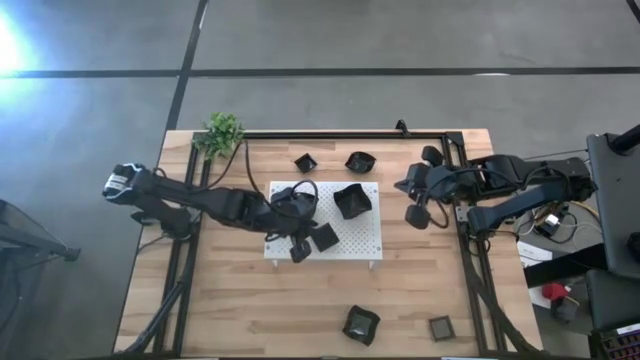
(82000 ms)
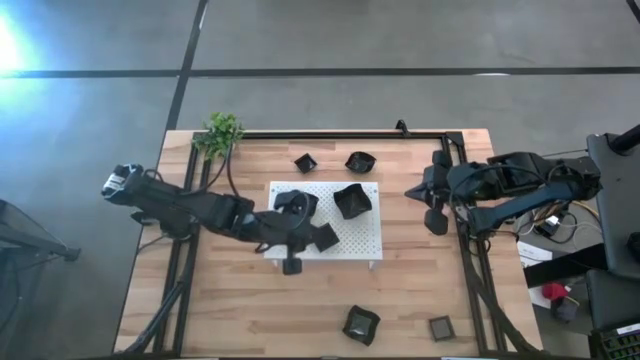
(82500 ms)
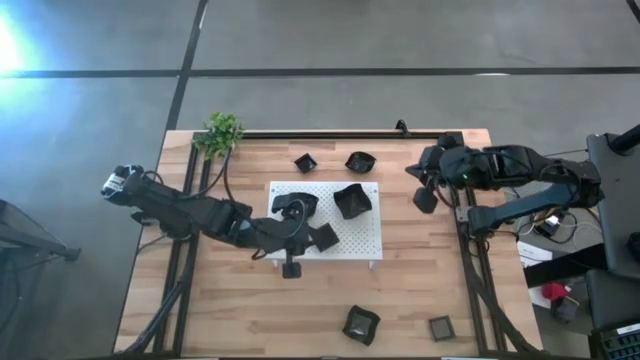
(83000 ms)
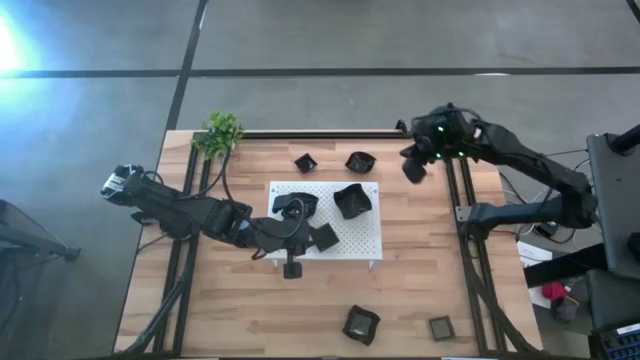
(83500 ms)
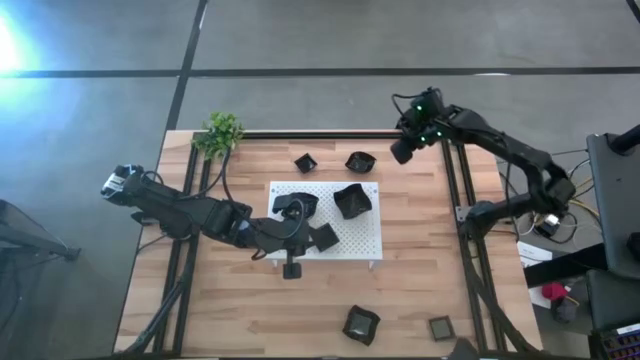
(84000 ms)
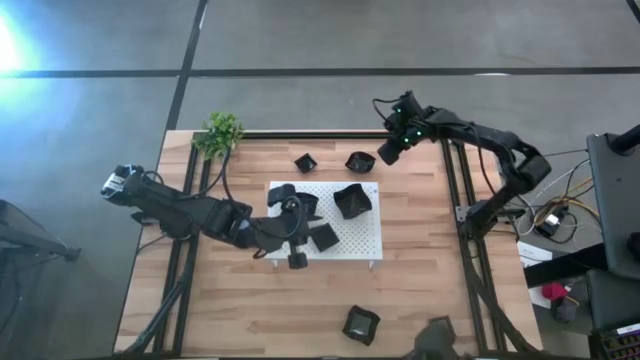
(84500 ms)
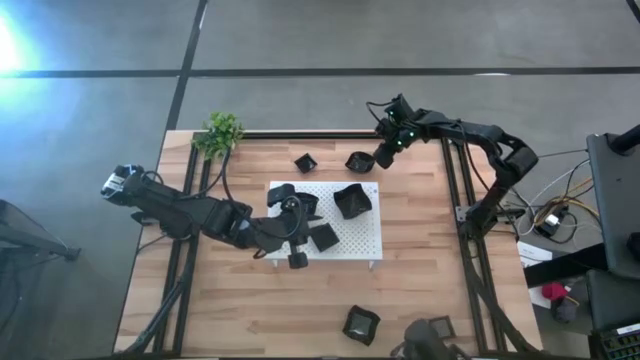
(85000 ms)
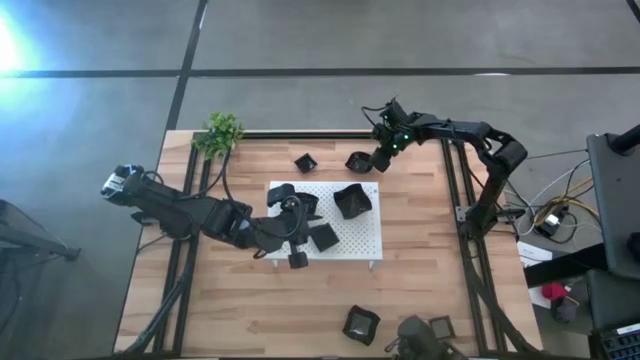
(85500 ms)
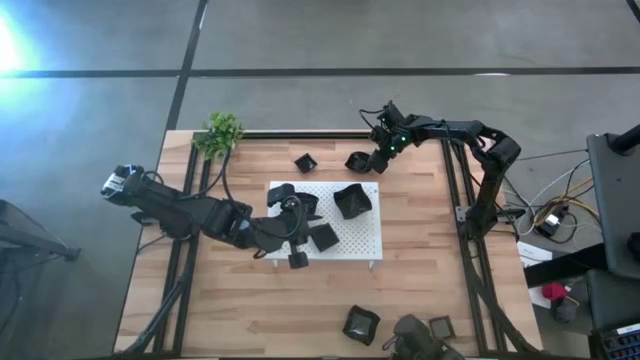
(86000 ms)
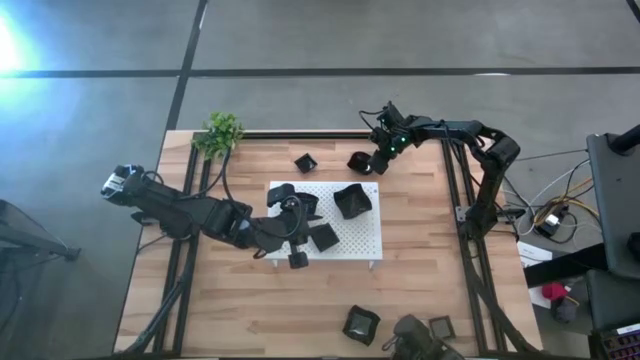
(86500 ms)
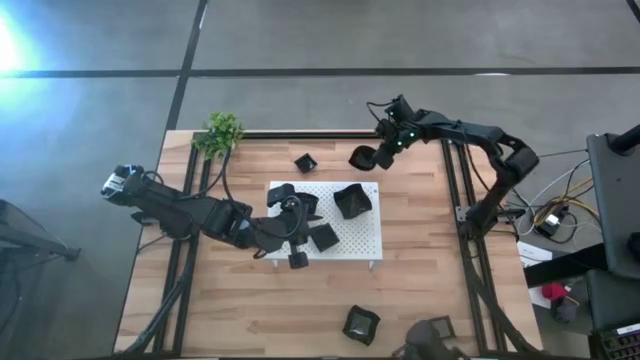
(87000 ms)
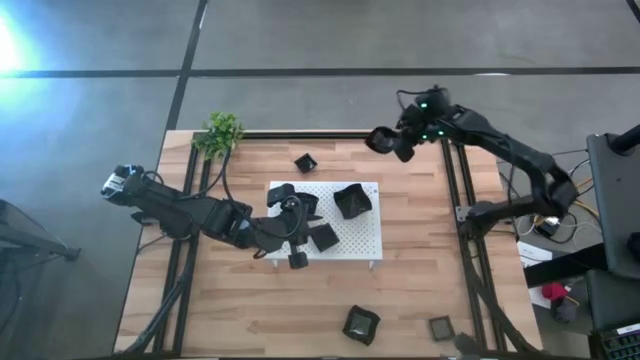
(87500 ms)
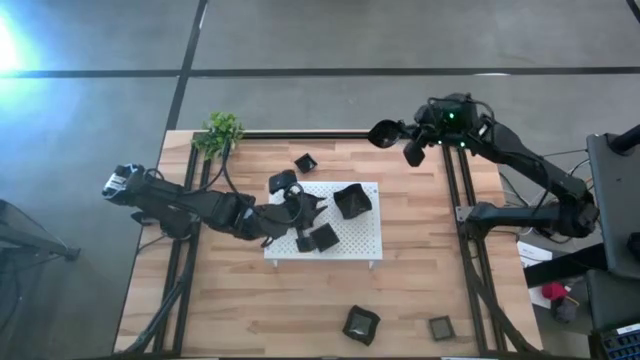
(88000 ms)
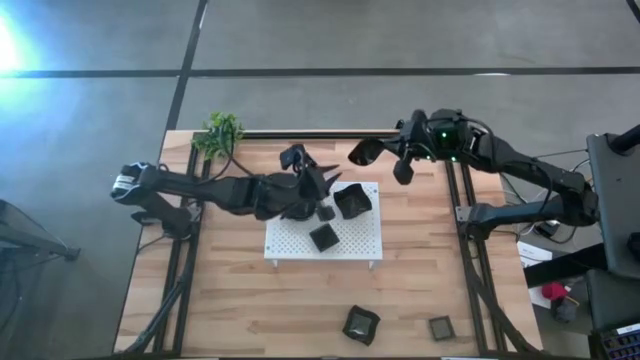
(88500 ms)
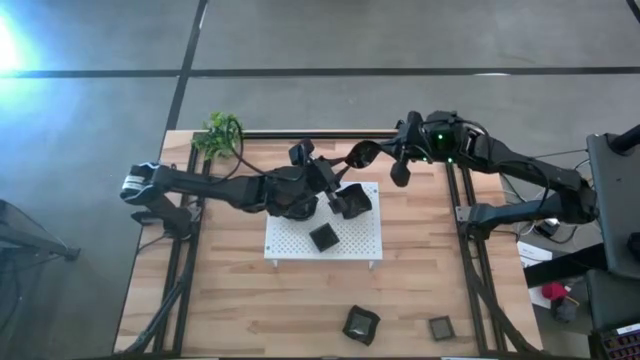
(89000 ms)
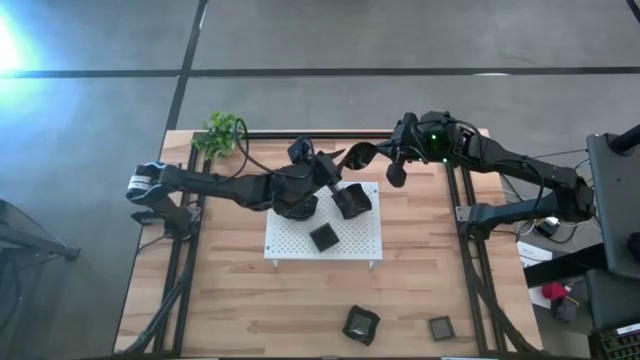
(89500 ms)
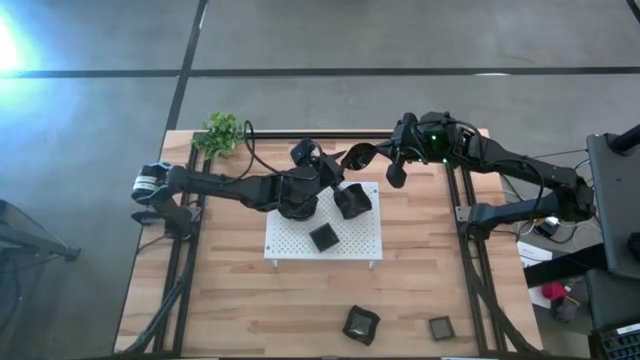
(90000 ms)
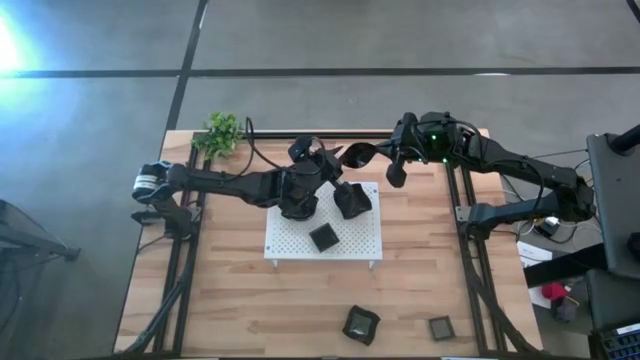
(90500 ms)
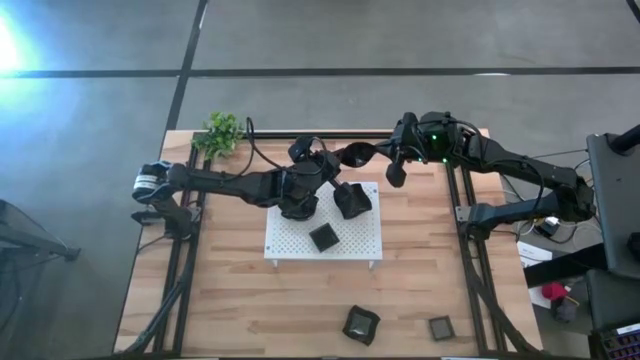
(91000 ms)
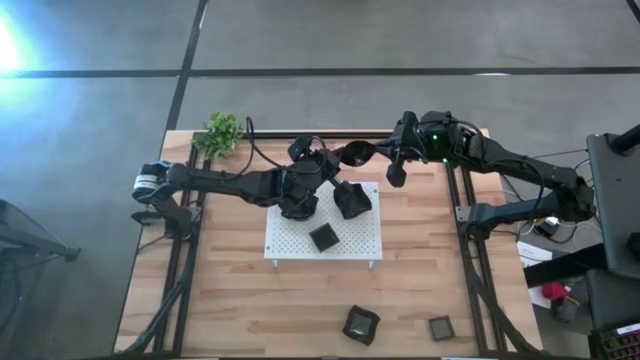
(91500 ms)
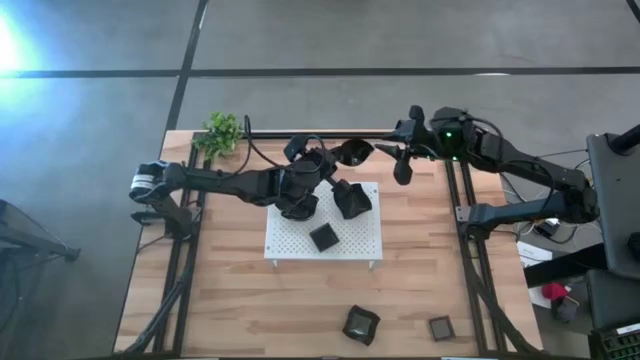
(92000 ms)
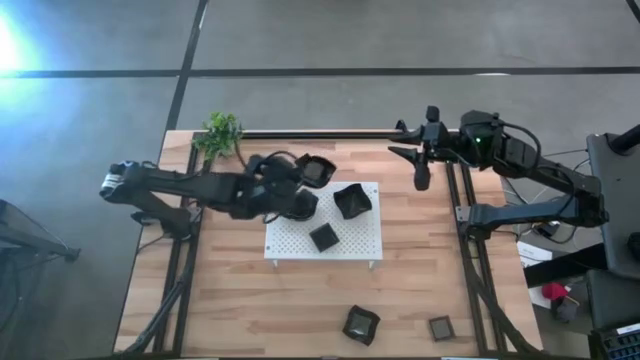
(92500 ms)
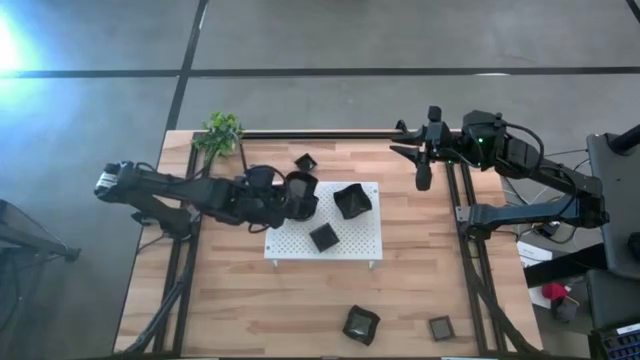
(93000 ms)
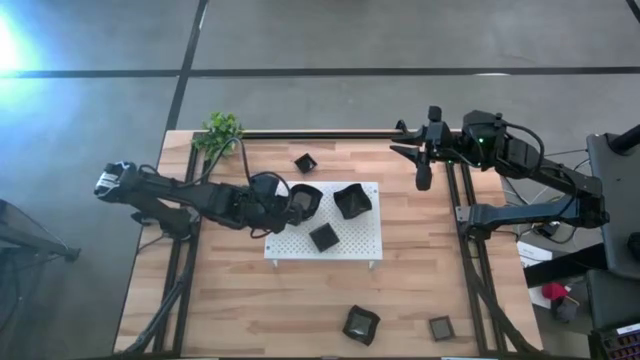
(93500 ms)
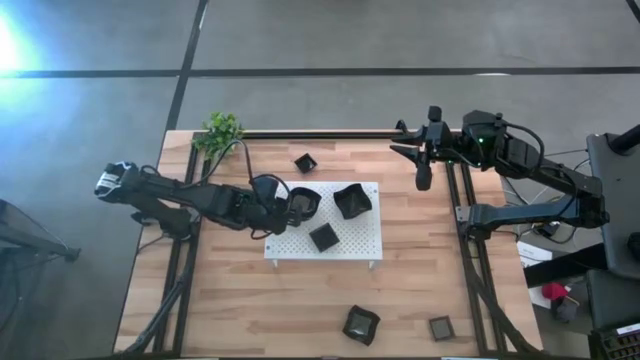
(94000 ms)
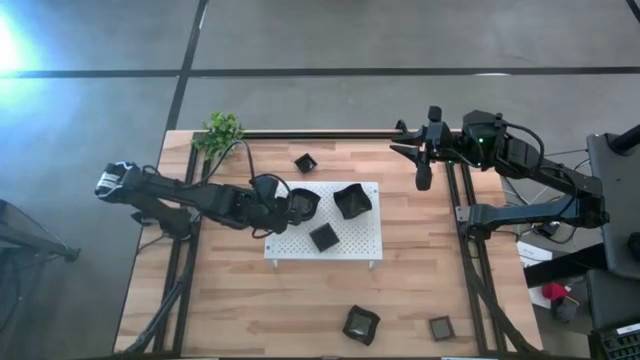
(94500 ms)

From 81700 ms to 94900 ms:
Task: Pick & Place Mini shaped plates
Stack the black leaf shaped plate on top of the black leaf shaped plate on the shelf

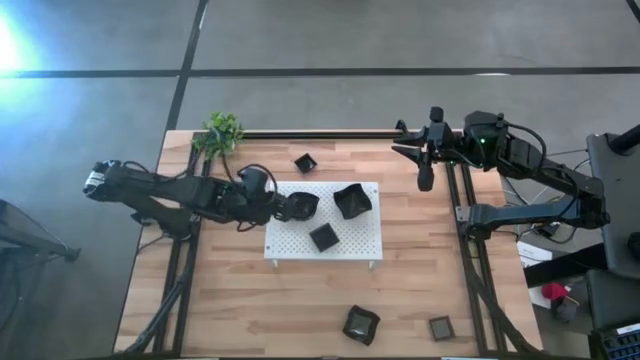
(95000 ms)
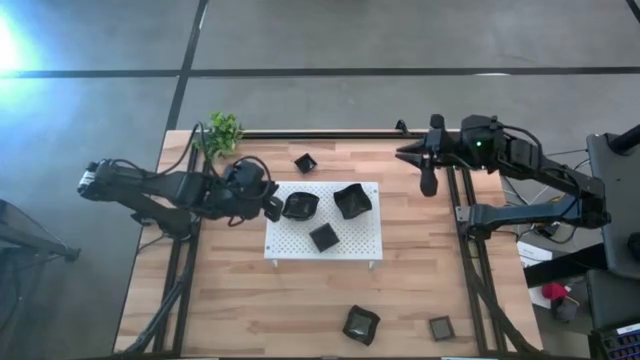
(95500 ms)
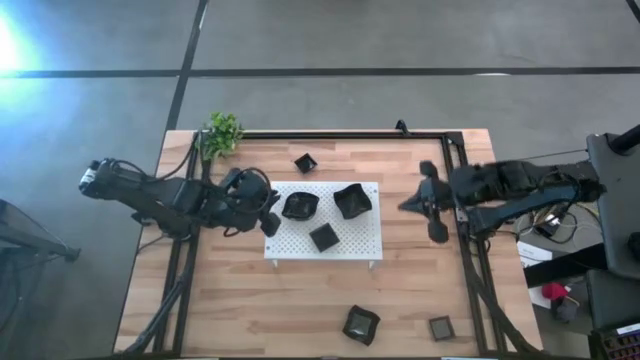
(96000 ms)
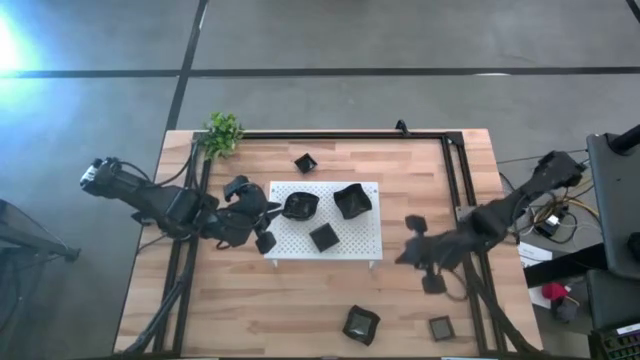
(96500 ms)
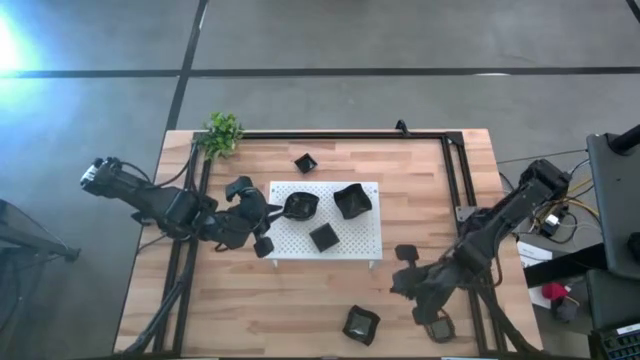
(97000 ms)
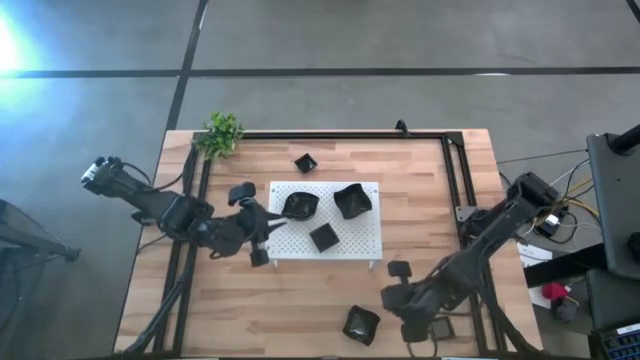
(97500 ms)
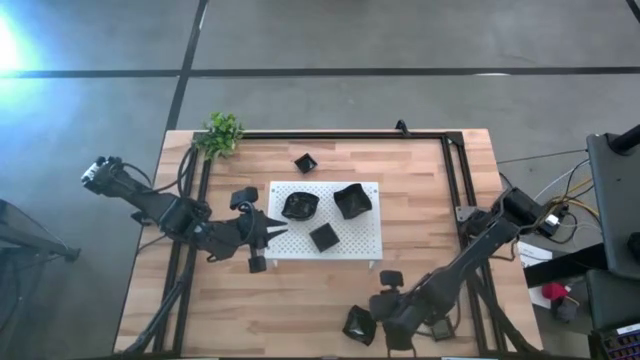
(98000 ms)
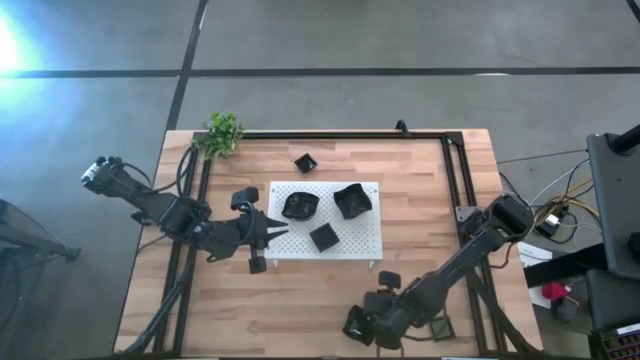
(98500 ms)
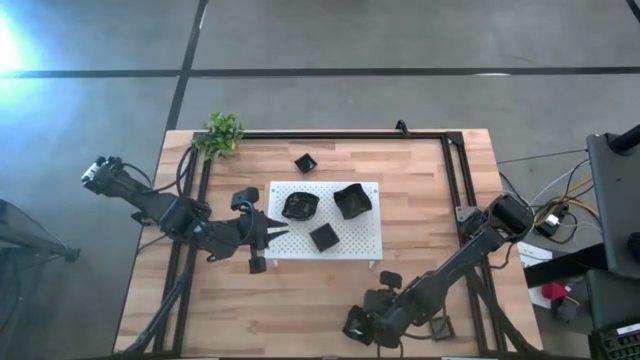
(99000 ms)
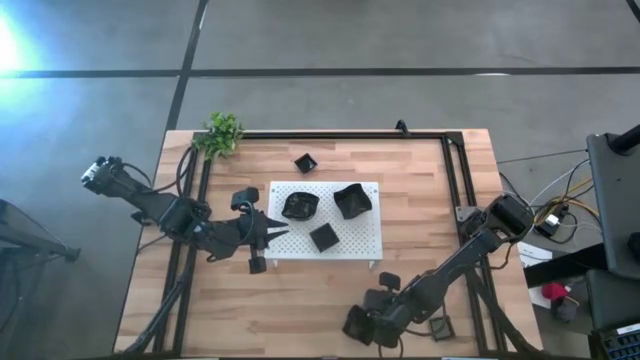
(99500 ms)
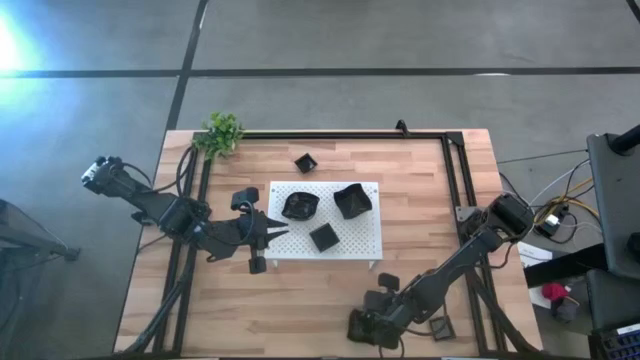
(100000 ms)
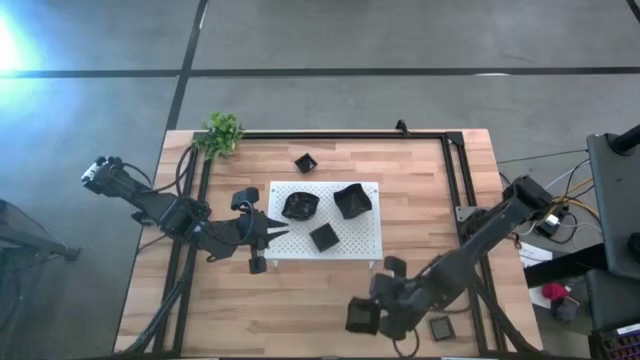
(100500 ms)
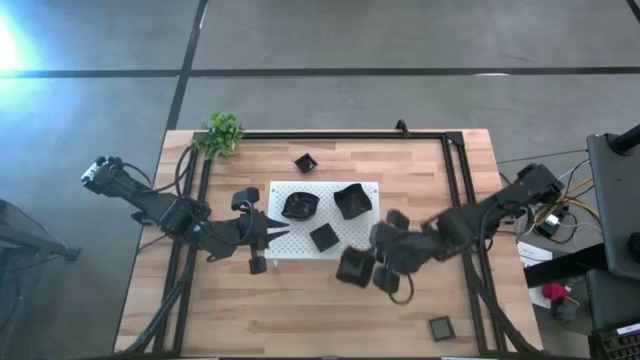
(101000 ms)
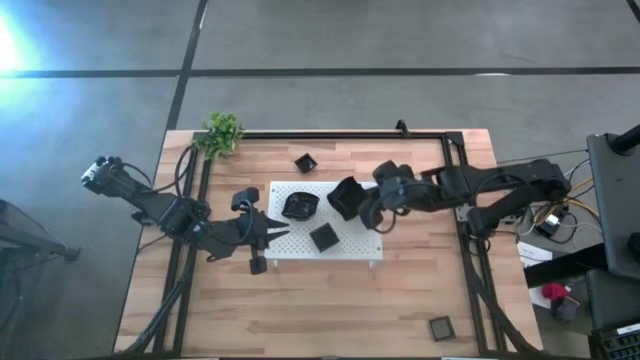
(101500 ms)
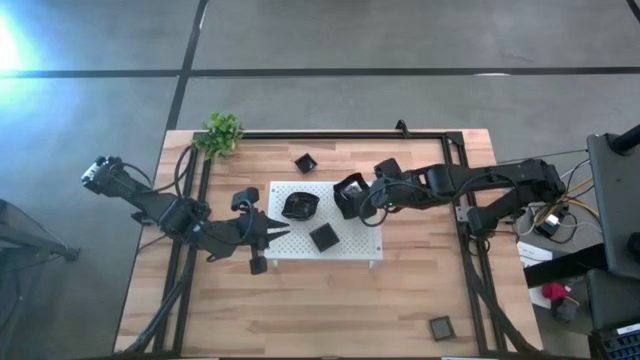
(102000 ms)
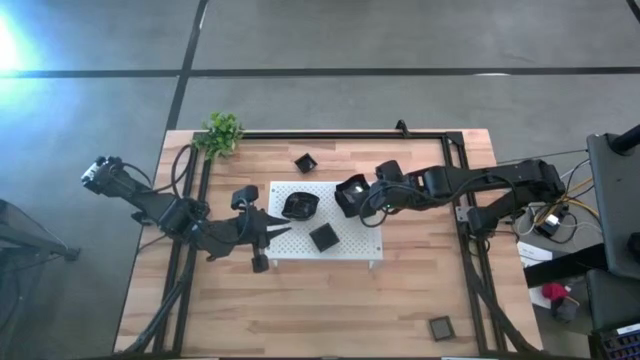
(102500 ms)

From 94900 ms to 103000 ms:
Stack the black distorted square plate on top of the black distorted square plate on the shelf
